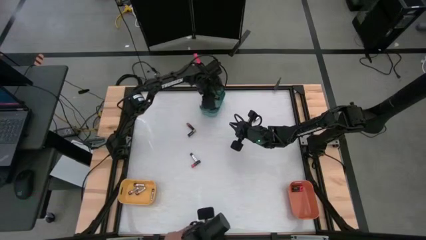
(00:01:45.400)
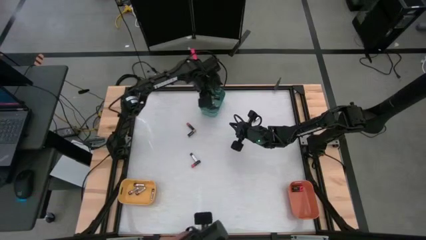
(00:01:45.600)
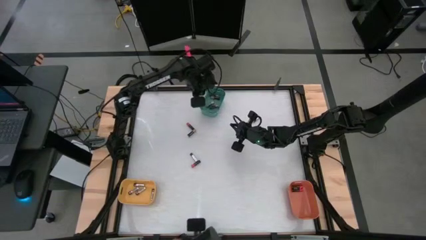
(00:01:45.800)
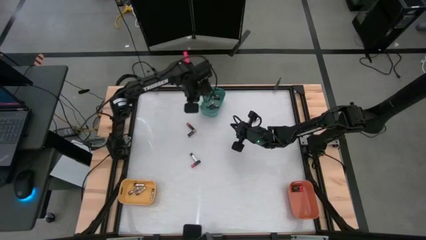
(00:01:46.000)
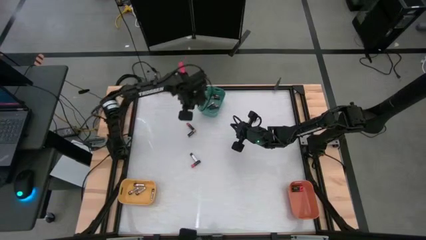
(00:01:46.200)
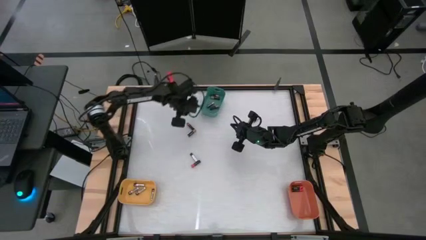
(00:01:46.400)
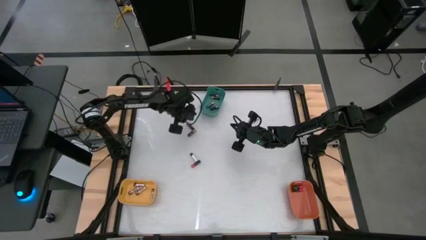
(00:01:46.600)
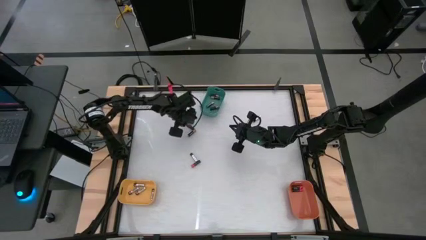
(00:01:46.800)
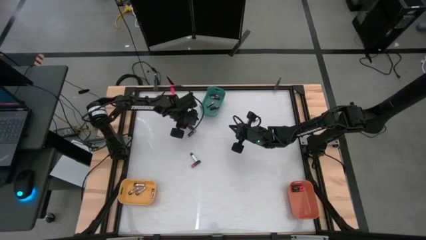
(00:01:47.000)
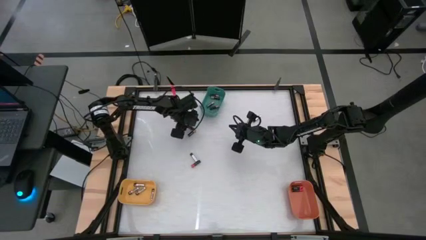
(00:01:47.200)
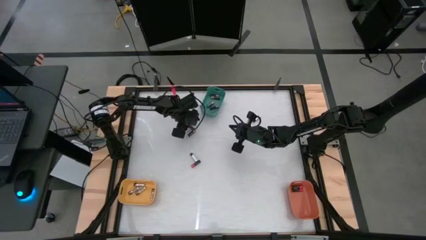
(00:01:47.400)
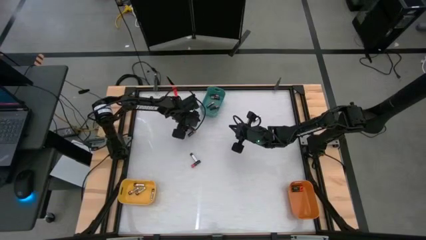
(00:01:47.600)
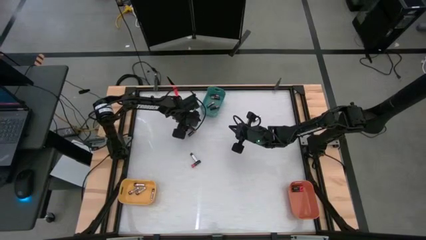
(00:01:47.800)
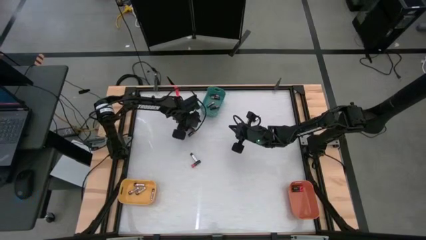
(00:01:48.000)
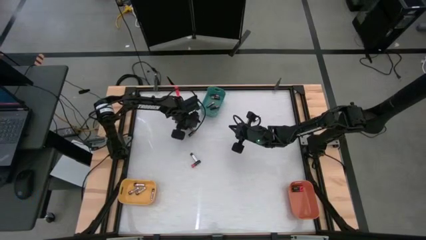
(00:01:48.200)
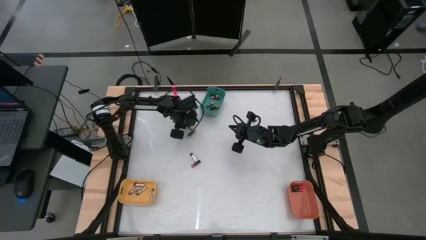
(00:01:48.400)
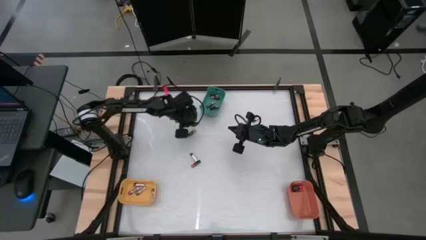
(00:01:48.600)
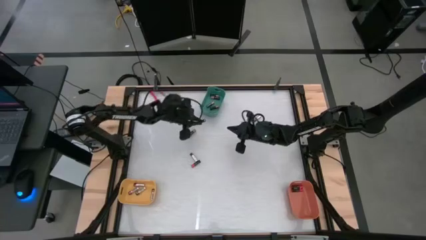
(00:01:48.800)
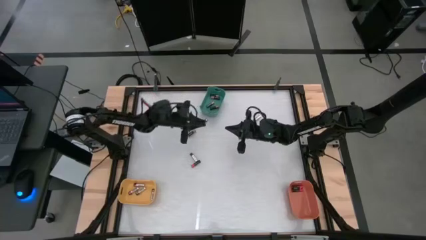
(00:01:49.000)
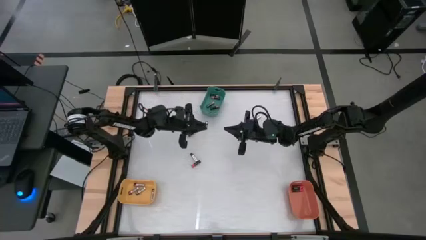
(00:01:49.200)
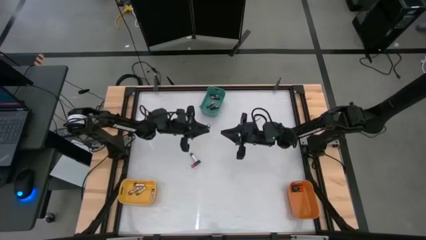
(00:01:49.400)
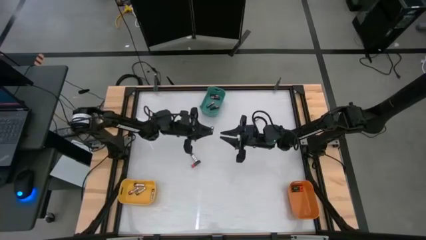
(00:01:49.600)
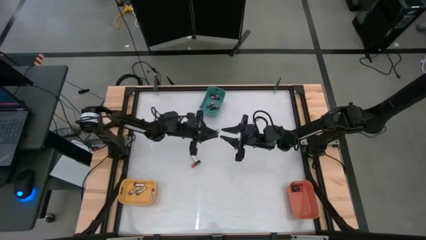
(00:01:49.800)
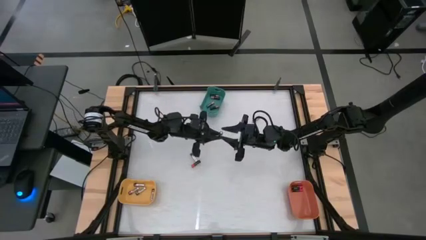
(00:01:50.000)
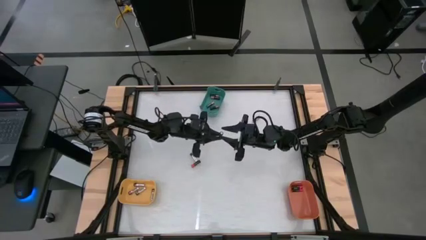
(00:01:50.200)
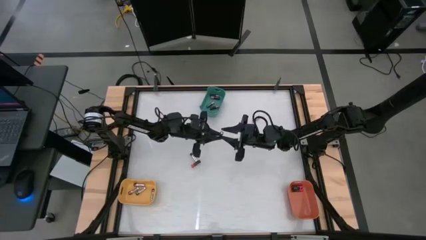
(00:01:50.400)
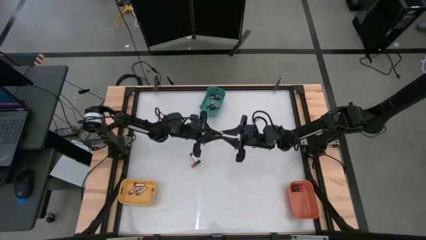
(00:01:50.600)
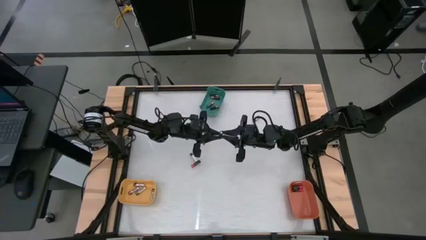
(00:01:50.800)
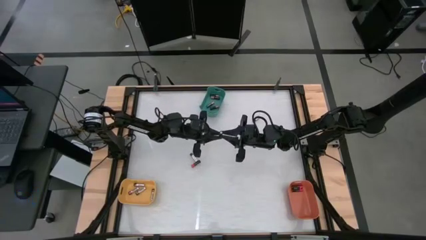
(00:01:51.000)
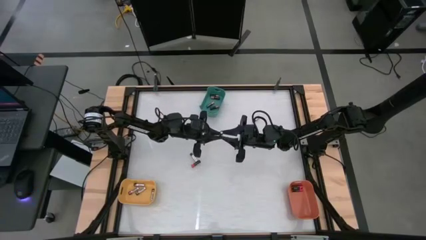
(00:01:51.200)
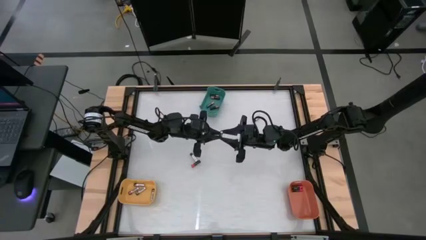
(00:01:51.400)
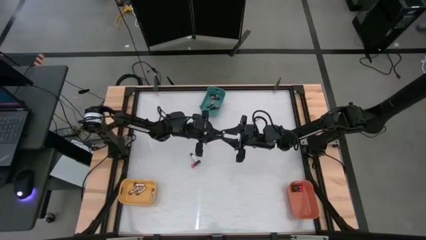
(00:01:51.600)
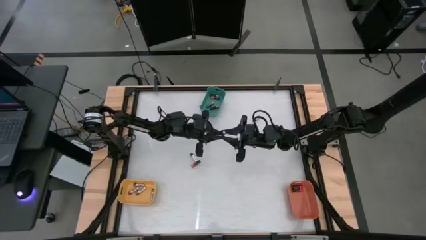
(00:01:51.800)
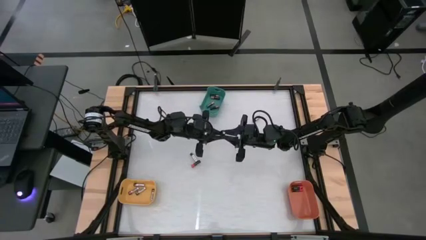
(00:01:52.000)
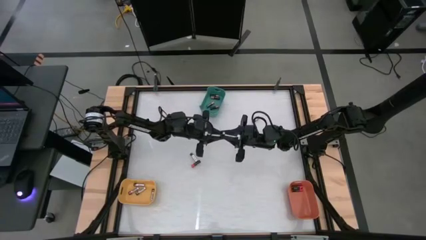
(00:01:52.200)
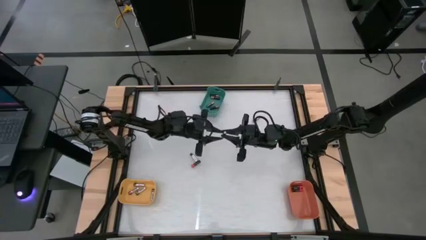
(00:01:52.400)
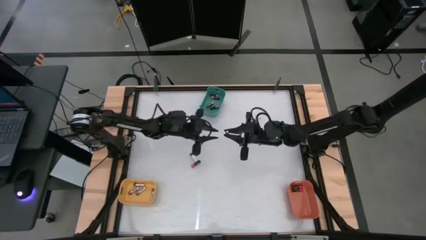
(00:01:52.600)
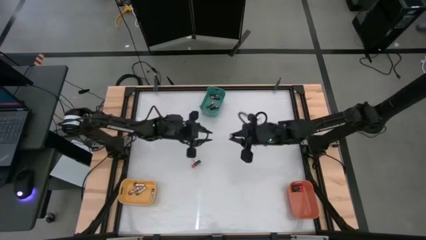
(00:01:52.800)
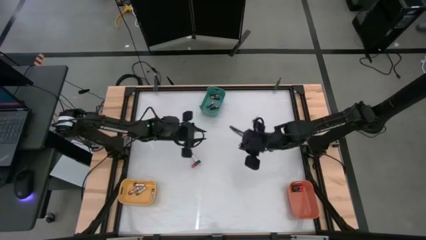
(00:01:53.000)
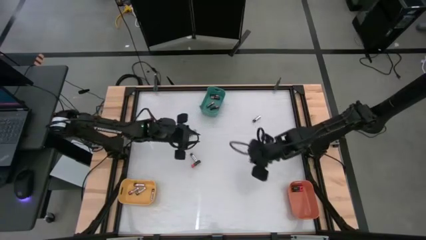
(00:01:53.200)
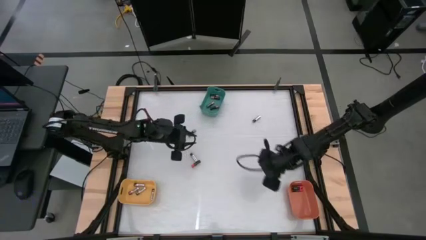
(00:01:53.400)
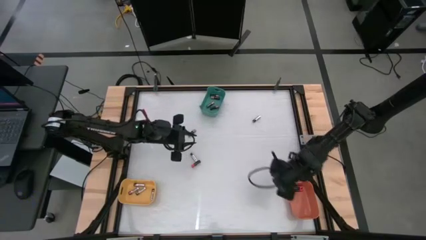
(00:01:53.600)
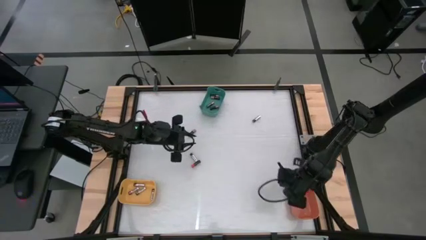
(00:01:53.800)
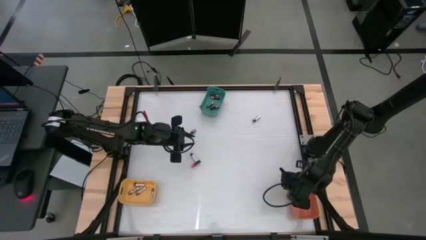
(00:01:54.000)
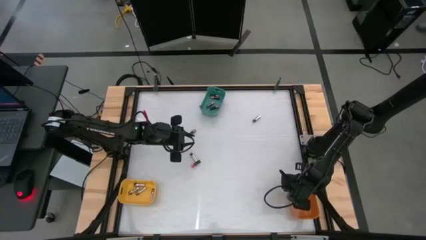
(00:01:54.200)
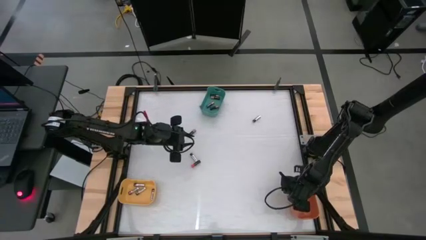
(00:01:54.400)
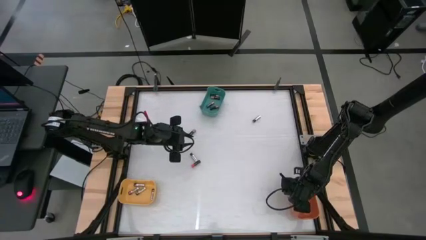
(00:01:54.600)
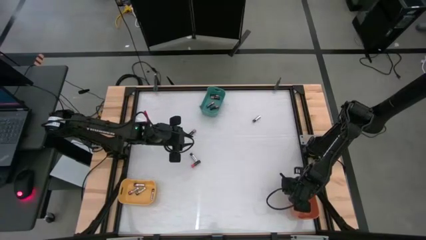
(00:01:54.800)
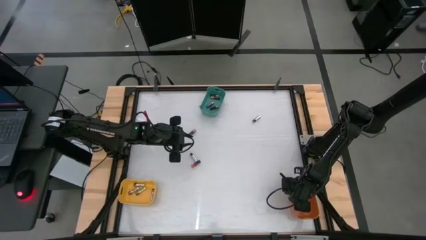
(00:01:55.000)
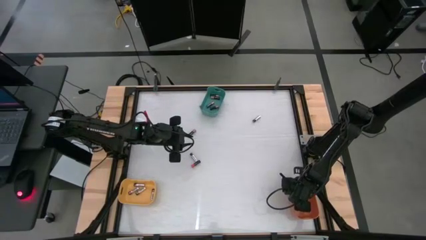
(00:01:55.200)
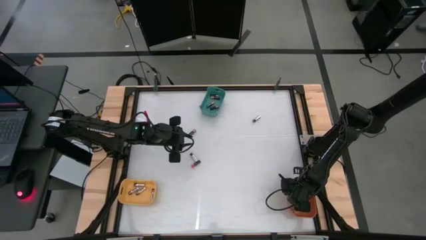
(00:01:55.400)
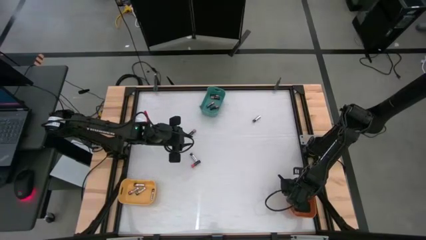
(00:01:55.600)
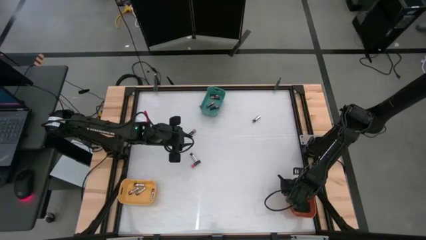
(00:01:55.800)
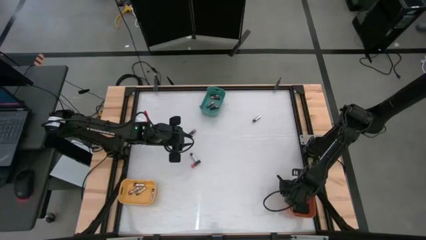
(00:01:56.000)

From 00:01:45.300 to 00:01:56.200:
Task: Sort batteries
Put the red battery into the orange bin
